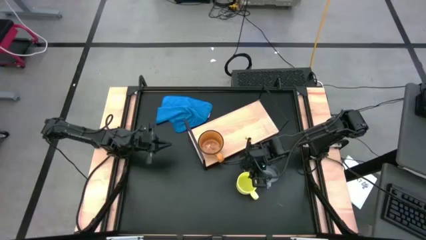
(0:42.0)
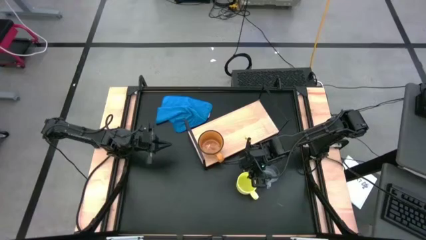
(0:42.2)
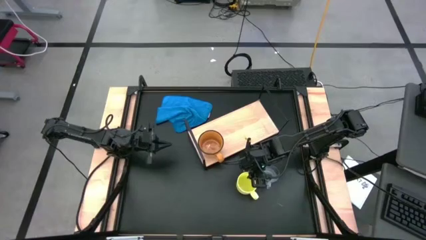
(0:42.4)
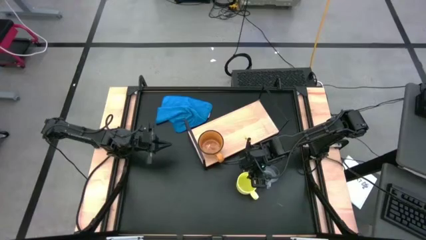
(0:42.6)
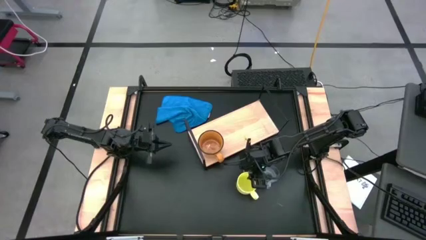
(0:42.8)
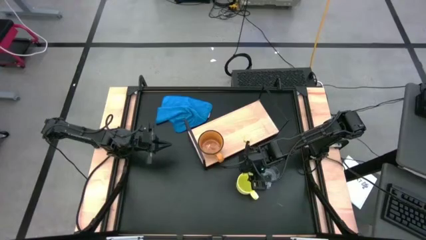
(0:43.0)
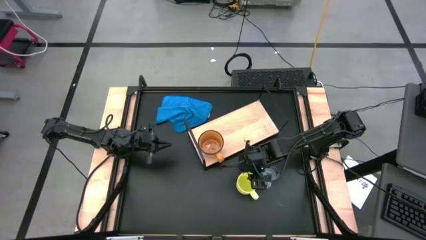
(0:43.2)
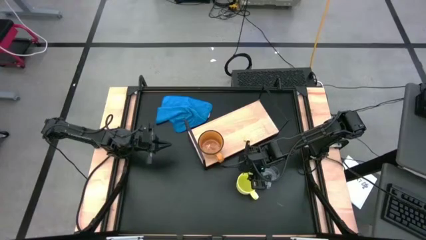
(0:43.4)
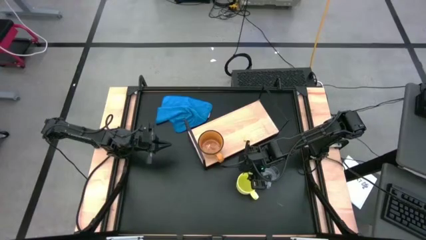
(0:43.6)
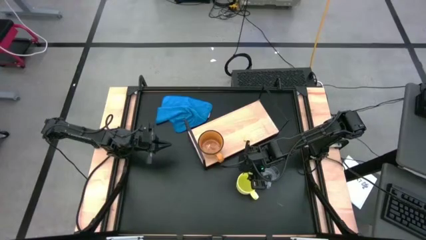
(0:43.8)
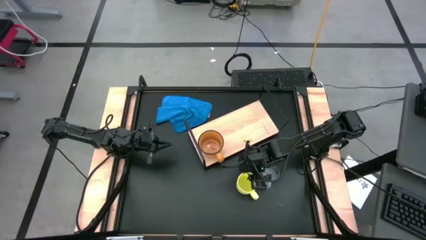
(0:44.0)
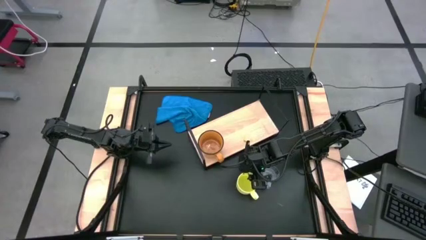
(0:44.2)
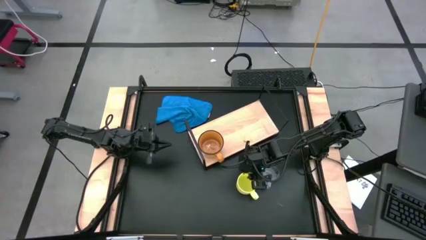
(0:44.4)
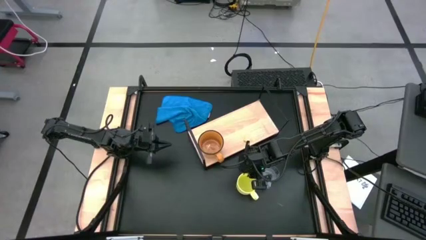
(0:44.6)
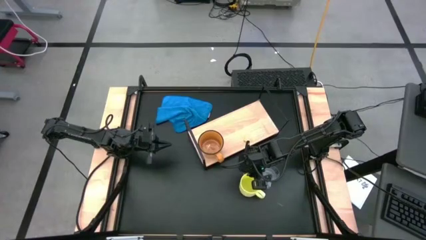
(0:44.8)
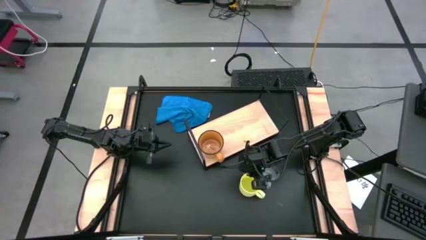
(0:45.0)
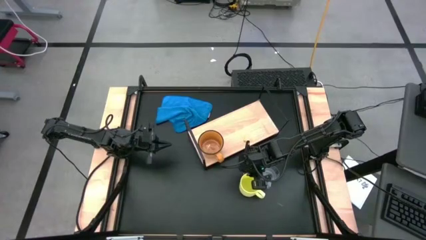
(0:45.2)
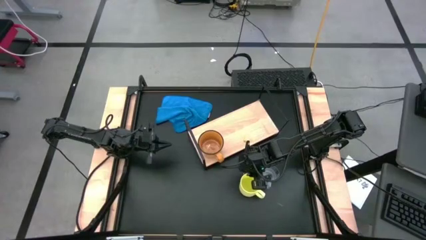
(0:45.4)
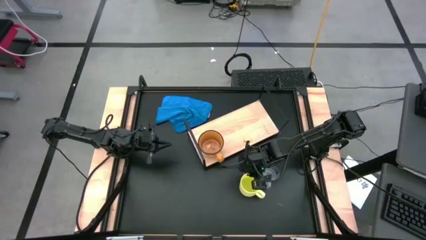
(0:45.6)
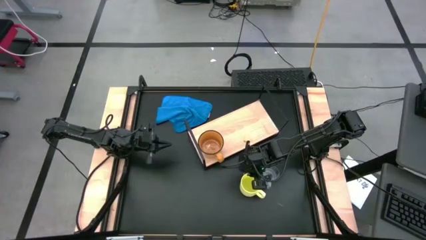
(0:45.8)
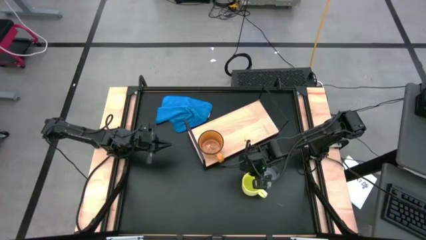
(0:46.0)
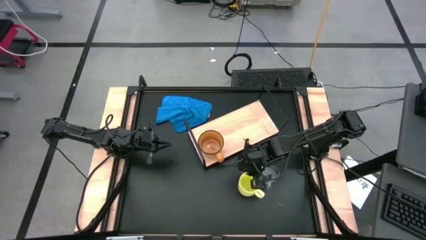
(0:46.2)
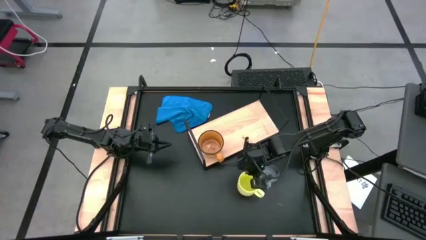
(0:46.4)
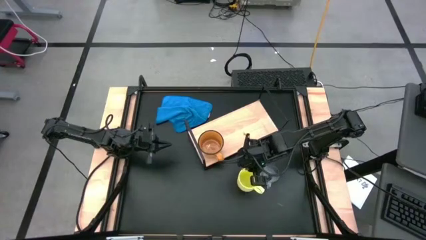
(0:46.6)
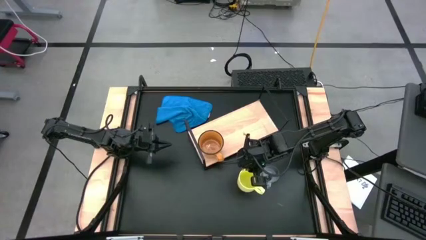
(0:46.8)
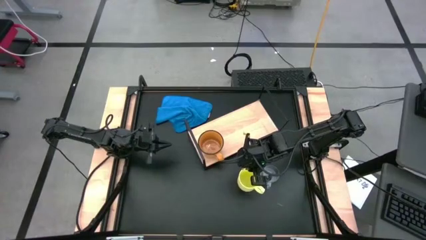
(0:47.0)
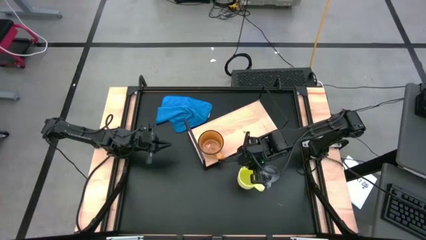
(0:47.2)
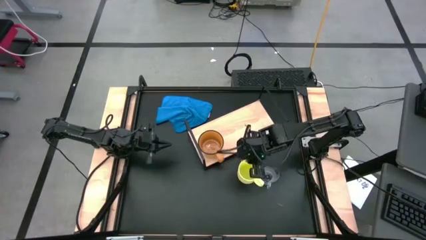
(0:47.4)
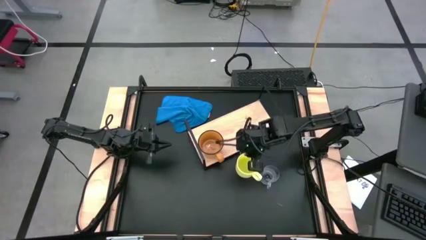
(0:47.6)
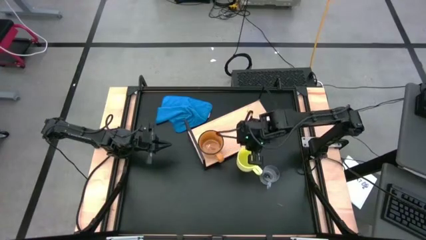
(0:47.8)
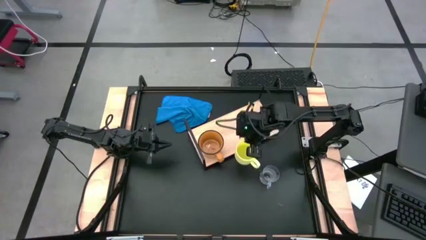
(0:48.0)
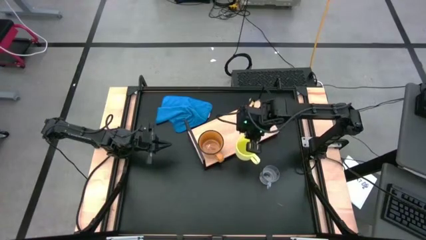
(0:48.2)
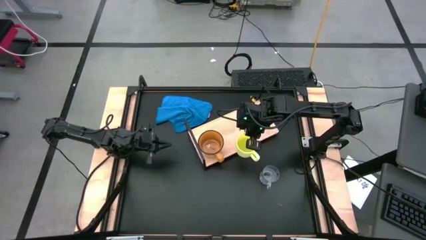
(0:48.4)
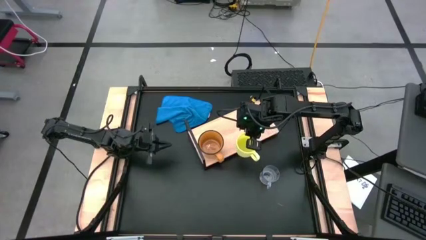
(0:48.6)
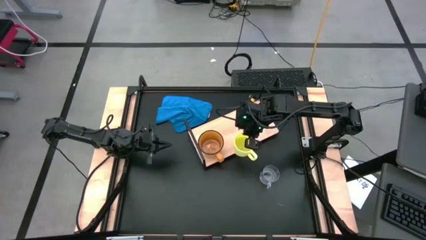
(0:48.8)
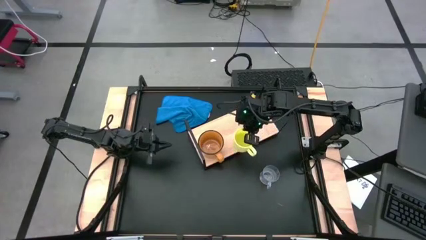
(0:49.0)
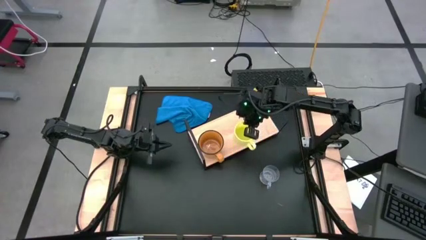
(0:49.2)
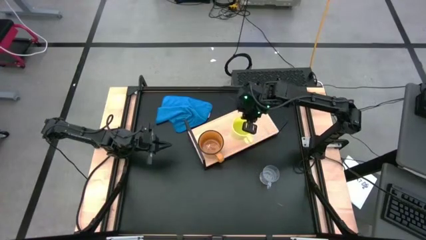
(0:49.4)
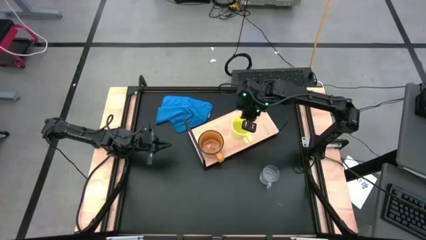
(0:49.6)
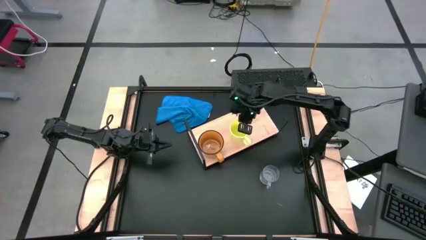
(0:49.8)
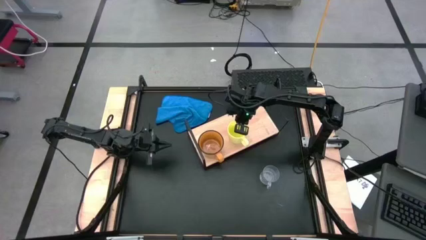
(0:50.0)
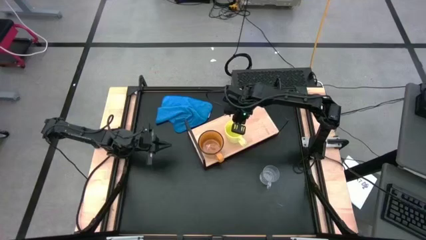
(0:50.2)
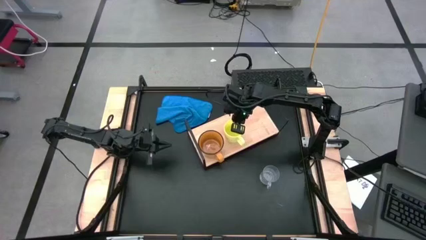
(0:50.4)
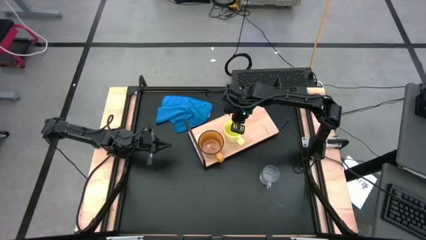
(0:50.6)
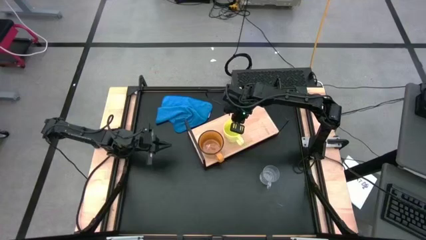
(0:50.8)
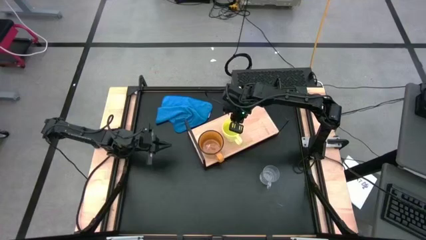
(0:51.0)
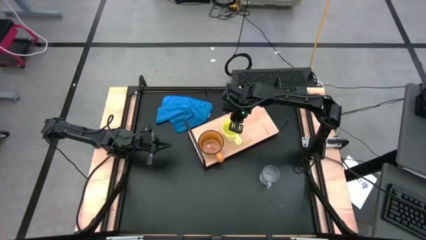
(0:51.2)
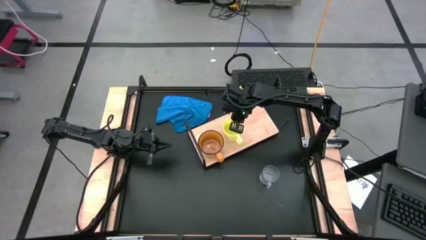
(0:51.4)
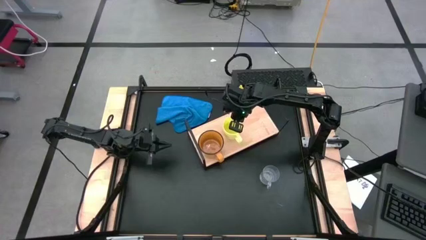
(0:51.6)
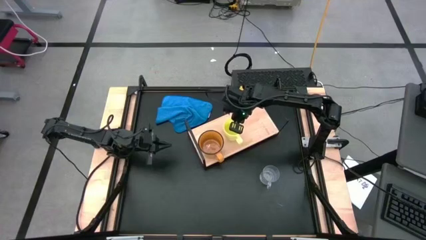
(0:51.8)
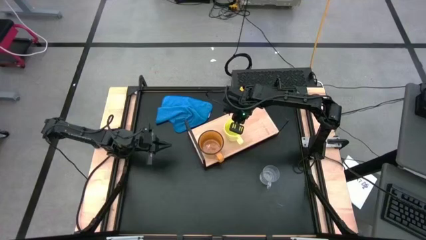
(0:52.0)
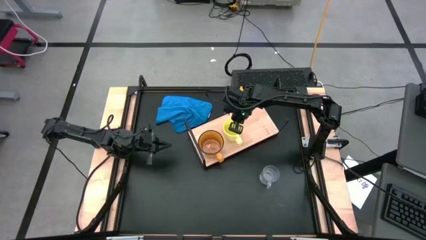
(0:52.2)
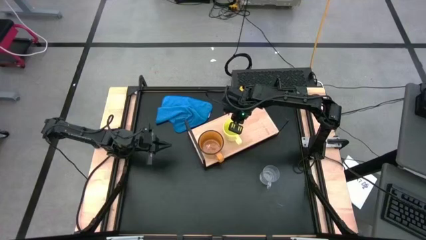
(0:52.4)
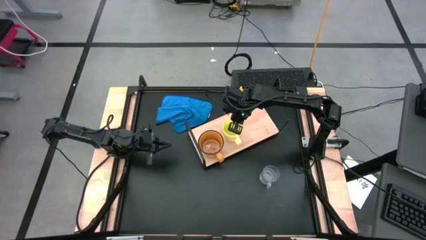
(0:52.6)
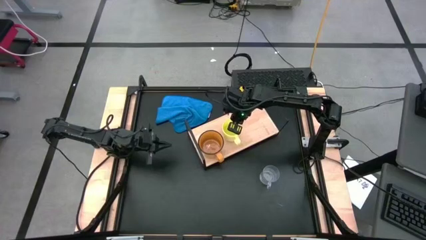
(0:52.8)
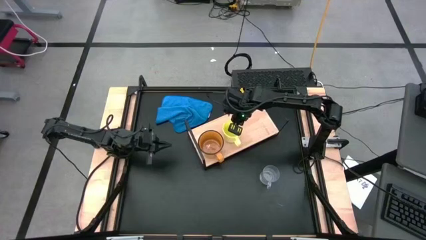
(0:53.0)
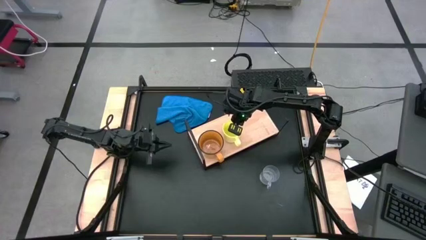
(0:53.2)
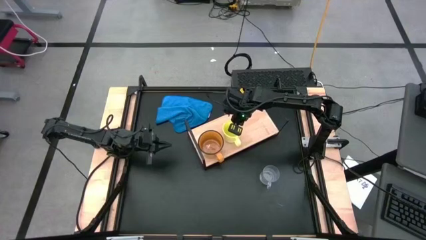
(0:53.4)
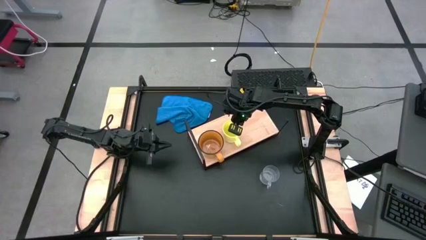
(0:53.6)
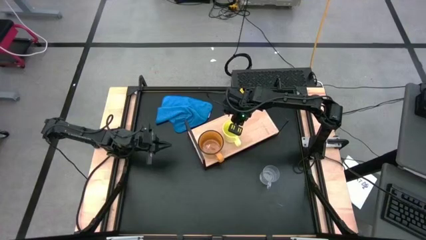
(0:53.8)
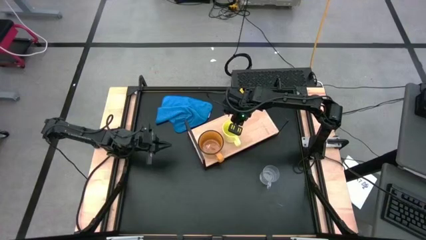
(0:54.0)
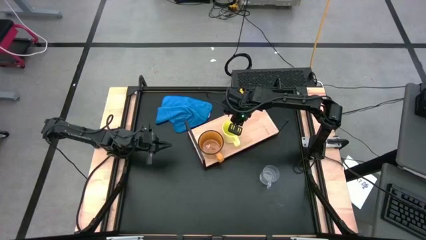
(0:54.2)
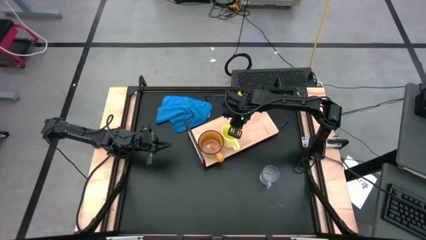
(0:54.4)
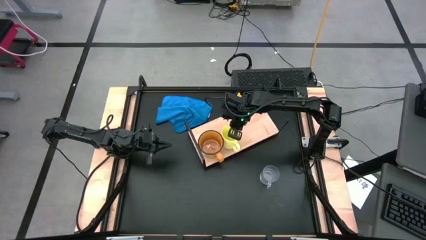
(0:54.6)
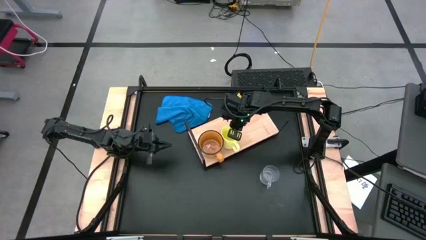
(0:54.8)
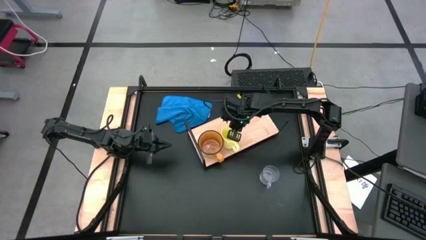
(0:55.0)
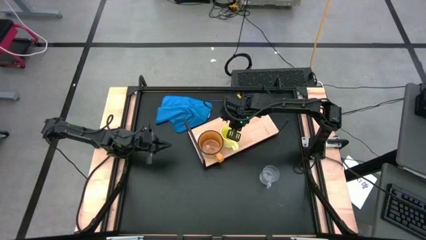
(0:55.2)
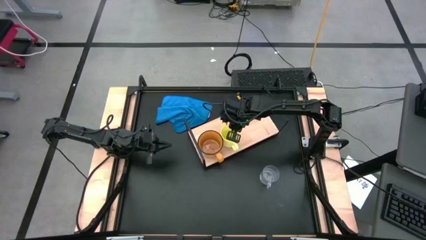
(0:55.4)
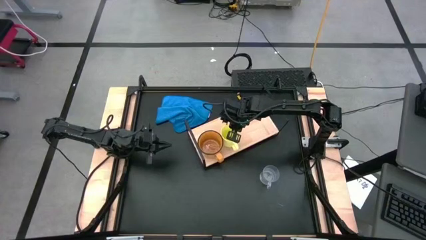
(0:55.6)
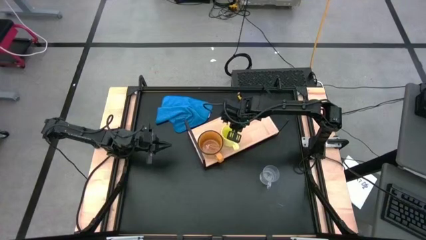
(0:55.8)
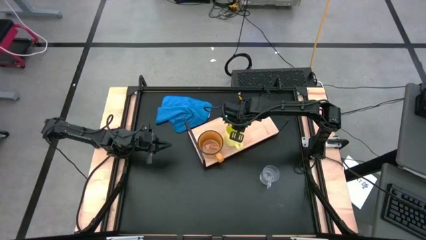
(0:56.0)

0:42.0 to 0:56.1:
Task: Stack small to large cups/mugs on shelf
Put the yellow mug on the shelf
